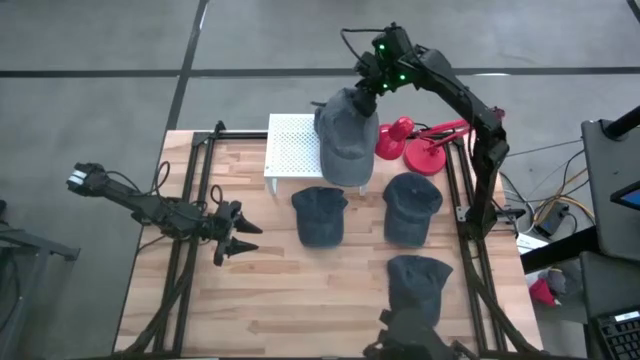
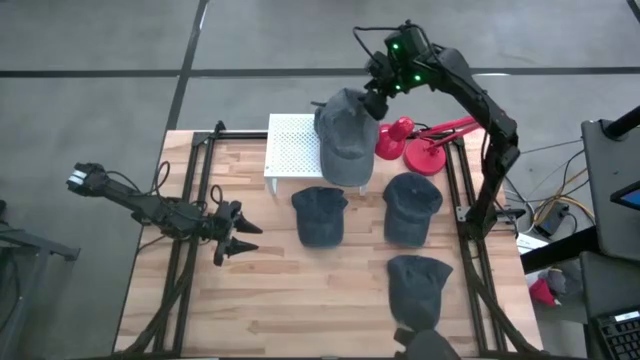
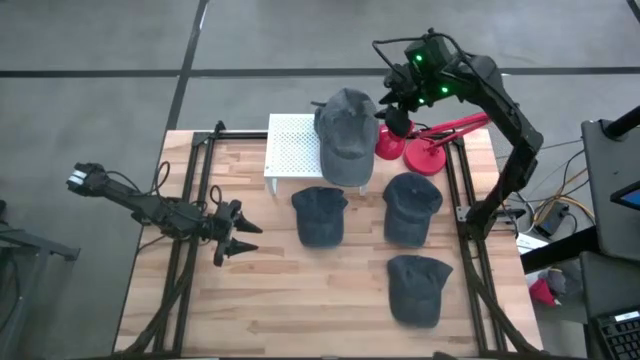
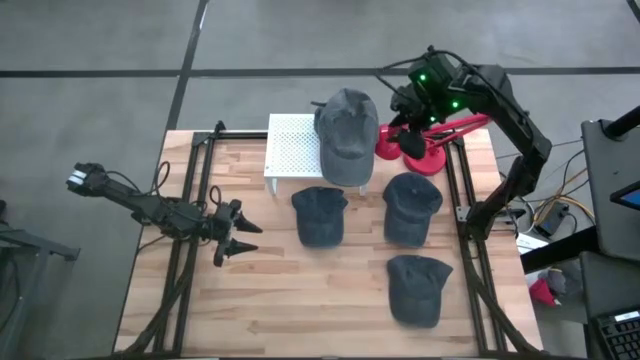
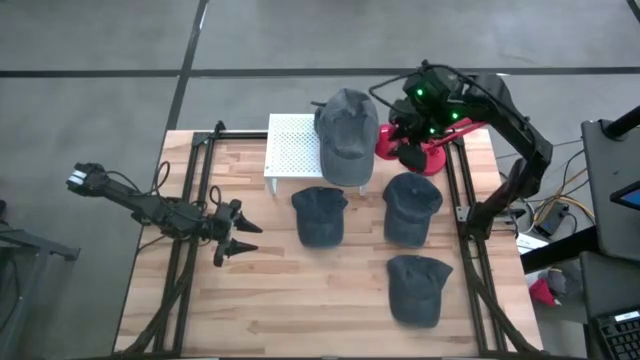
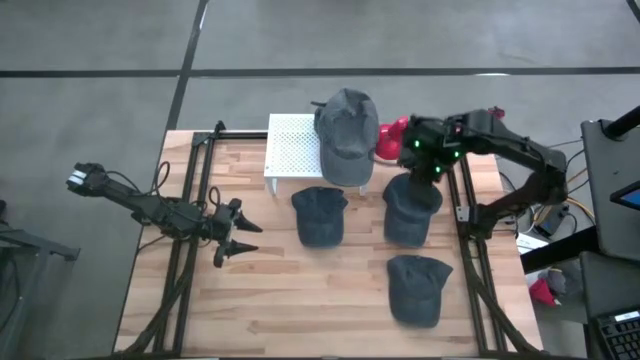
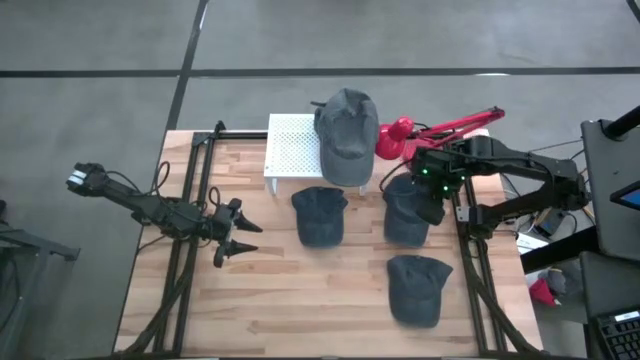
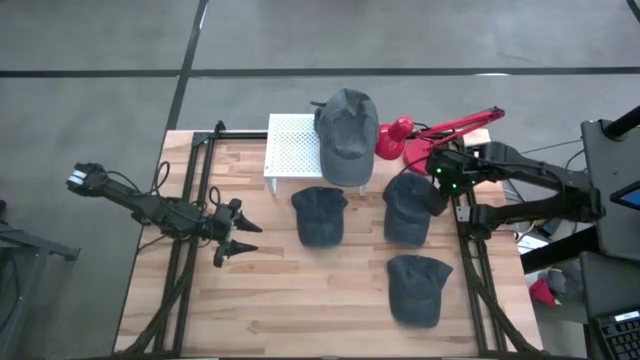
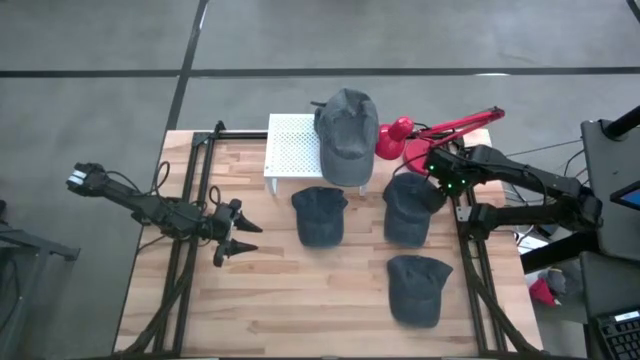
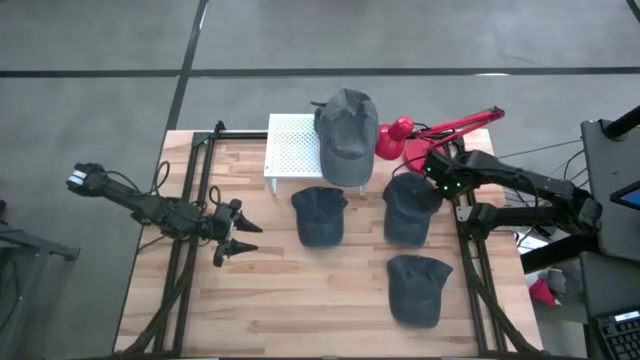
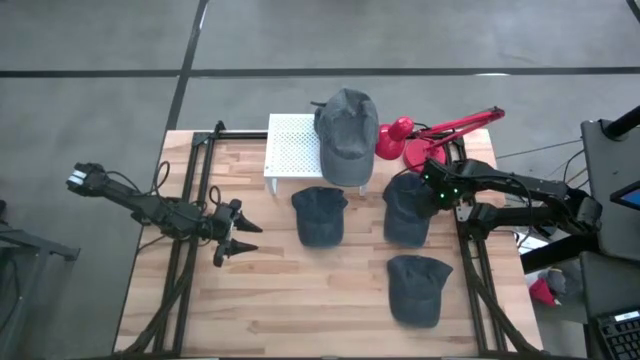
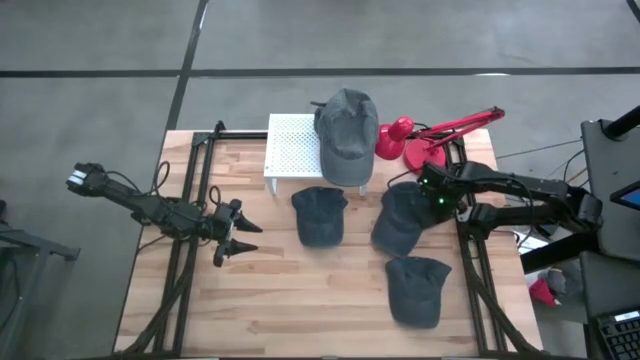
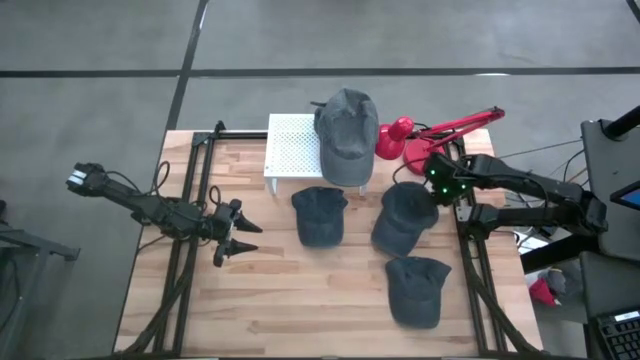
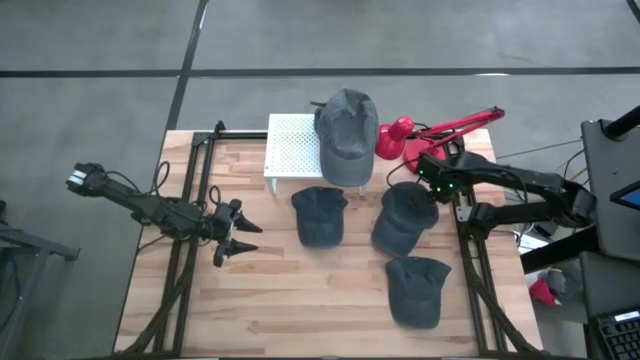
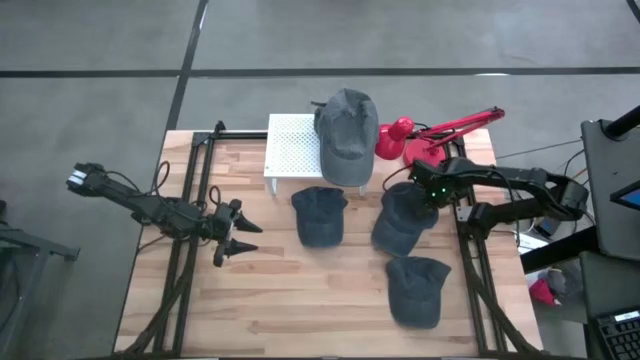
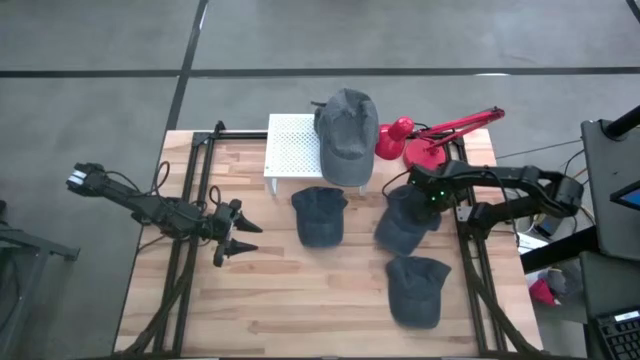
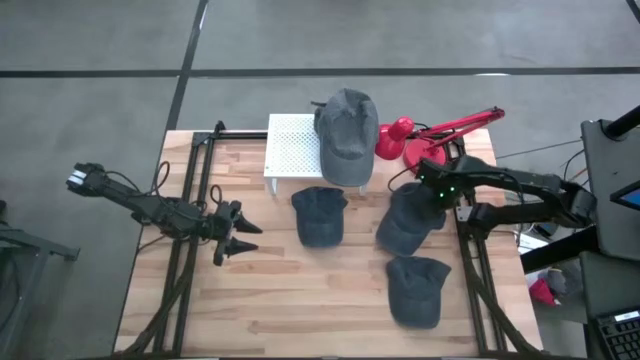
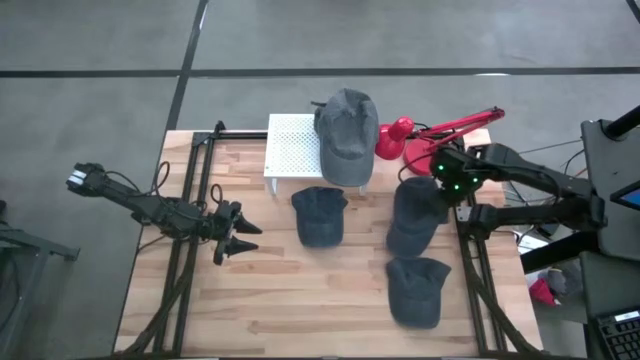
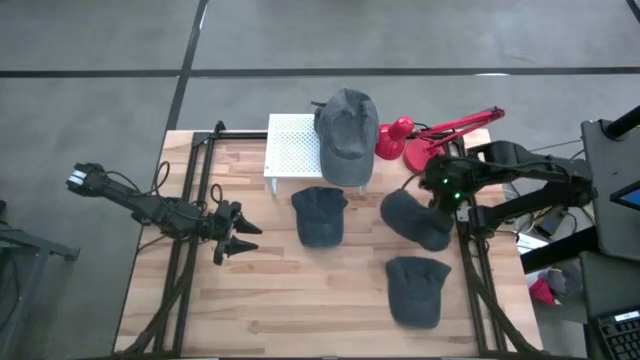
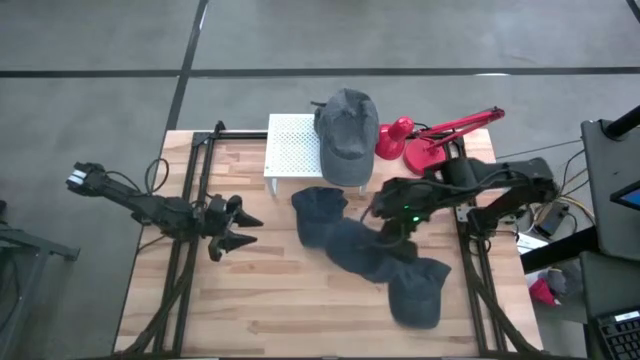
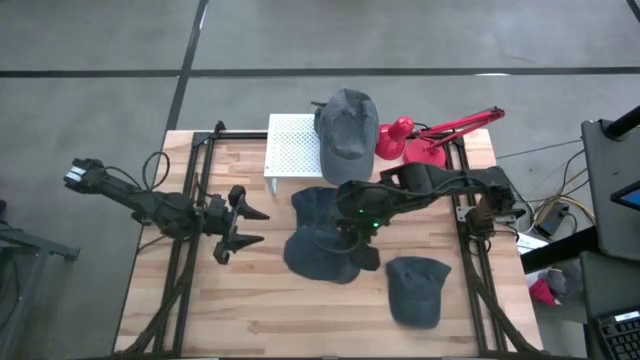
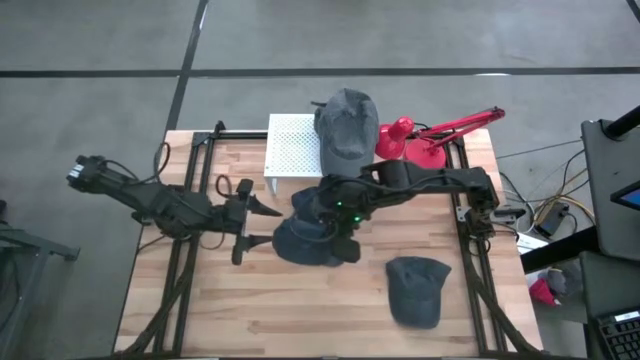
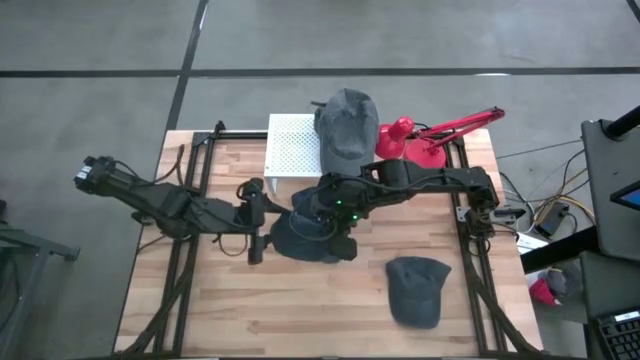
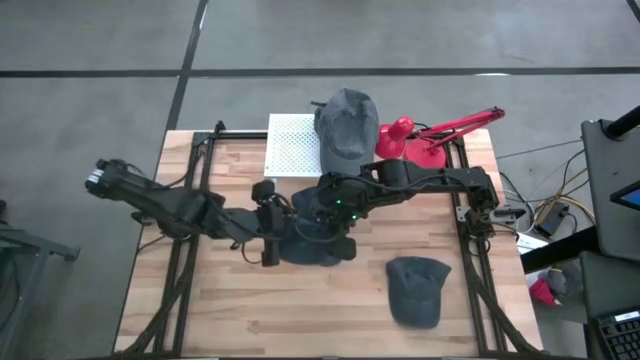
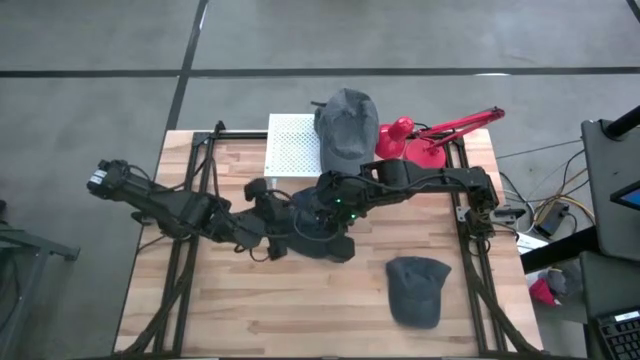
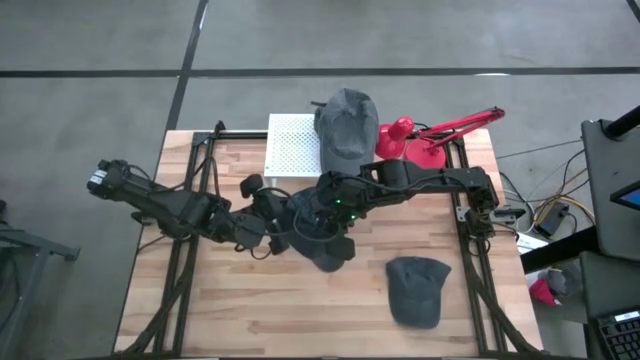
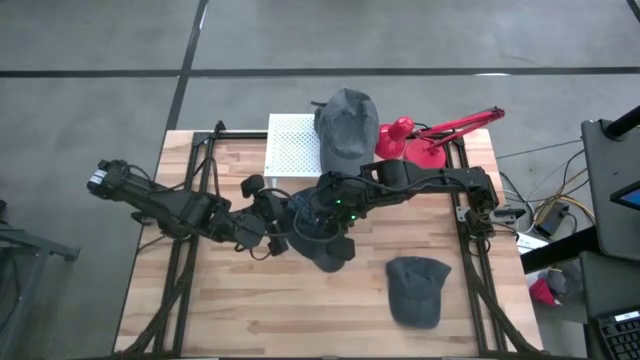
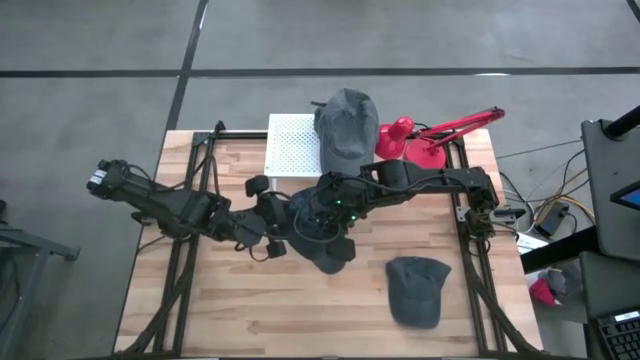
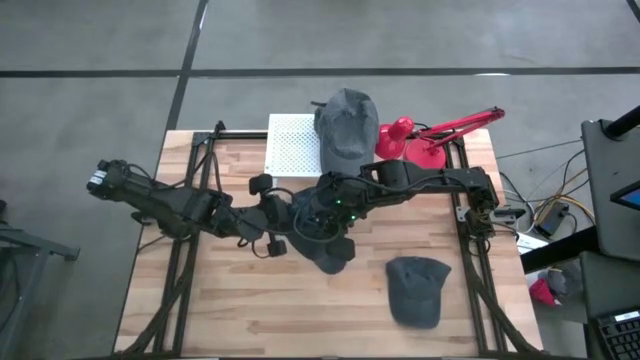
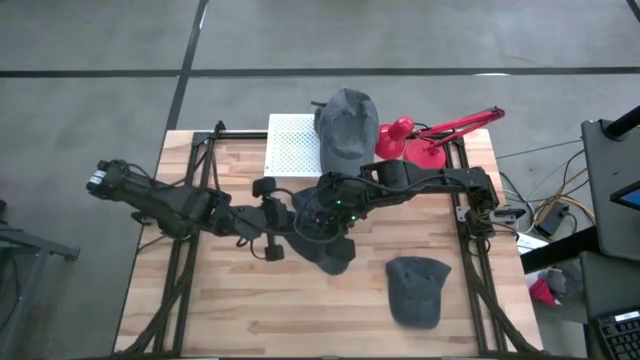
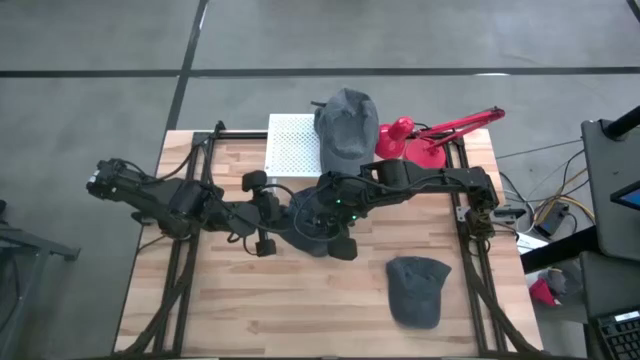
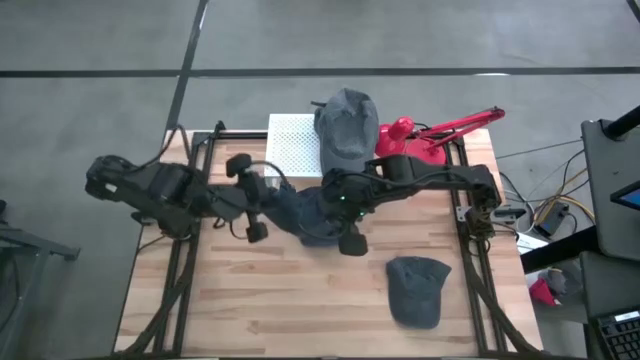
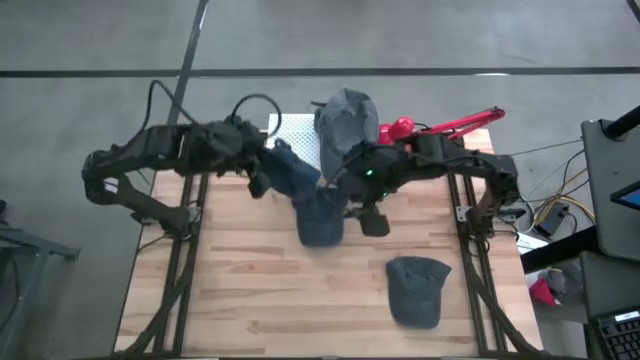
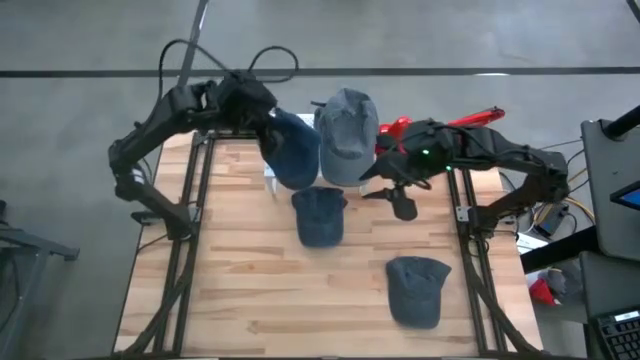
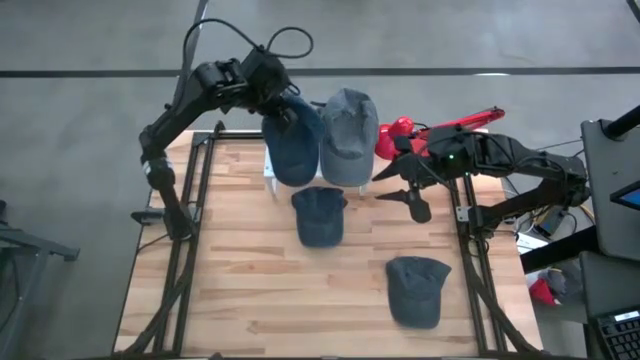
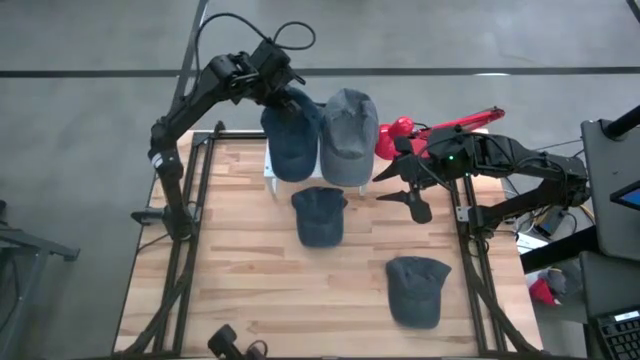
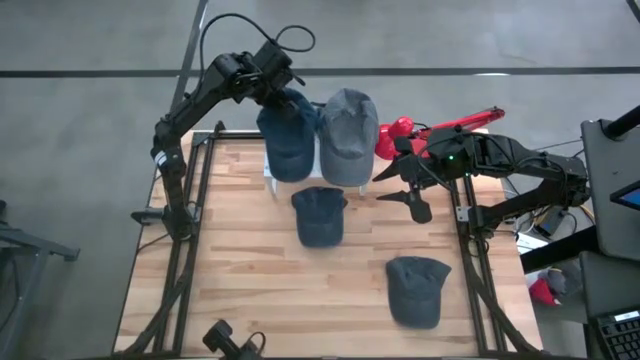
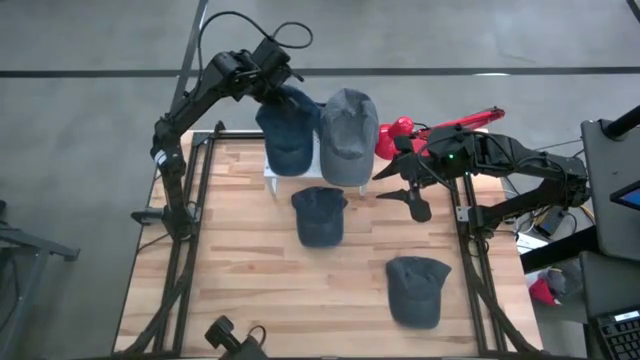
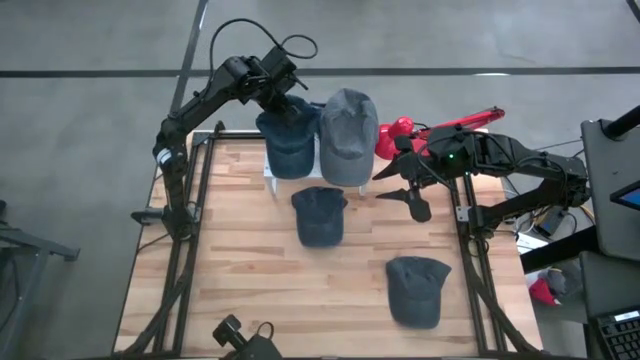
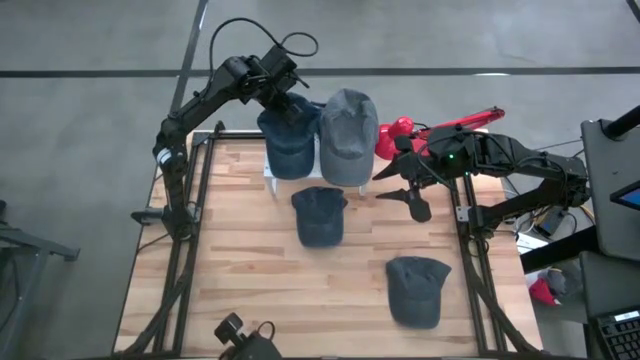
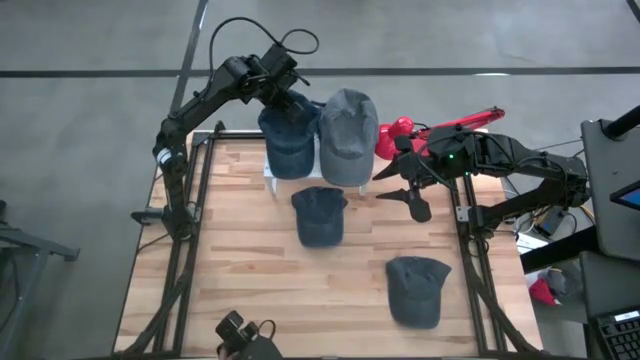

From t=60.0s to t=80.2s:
Task: Pick & Place hat
Put the top right blue cap on the shelf
